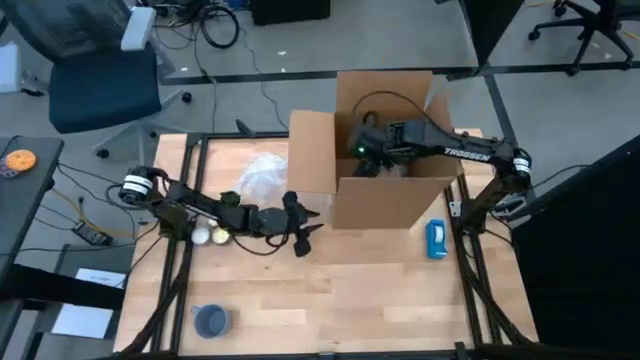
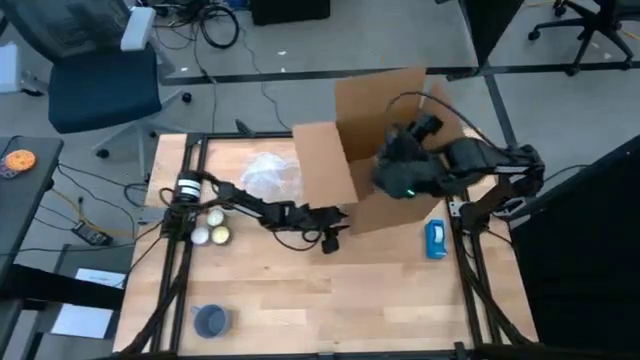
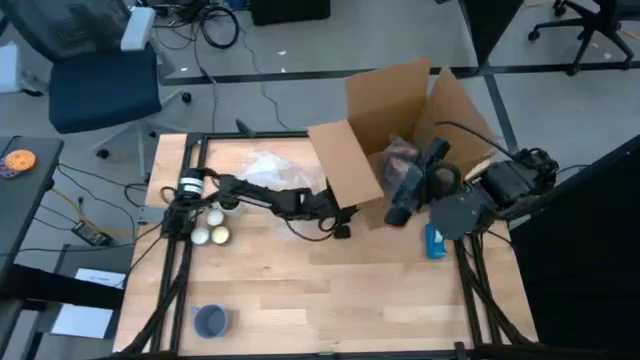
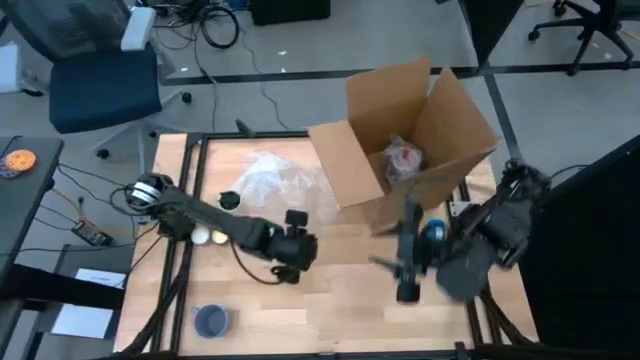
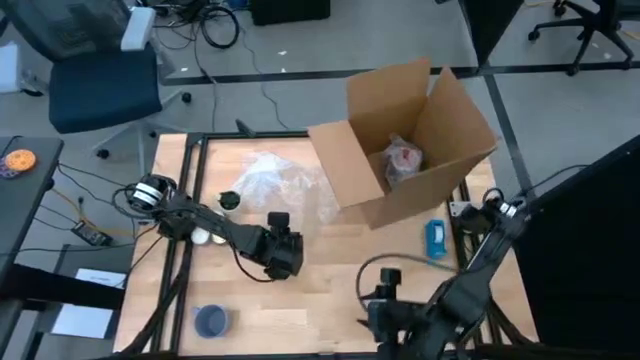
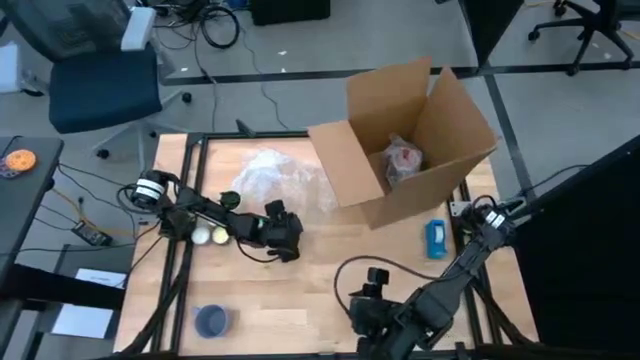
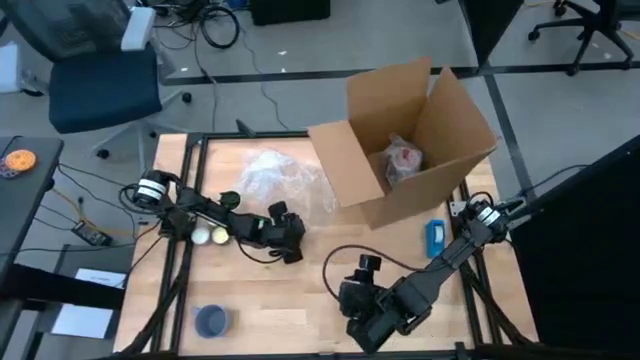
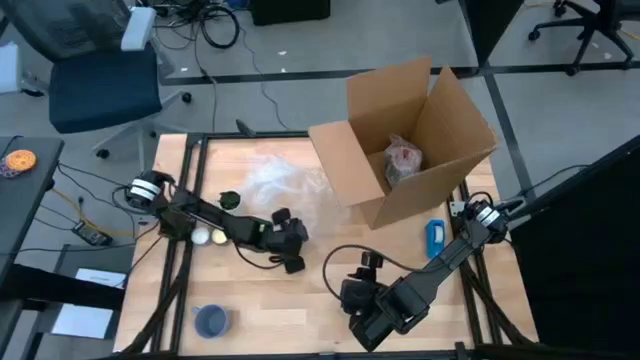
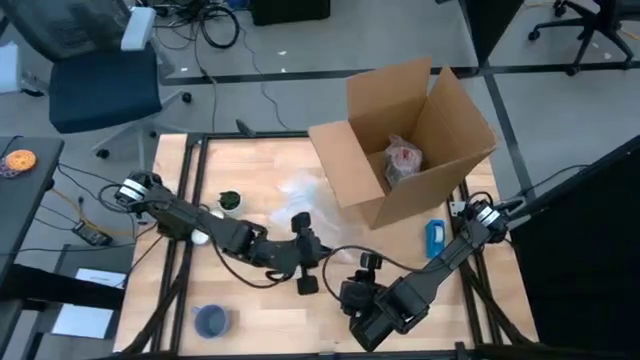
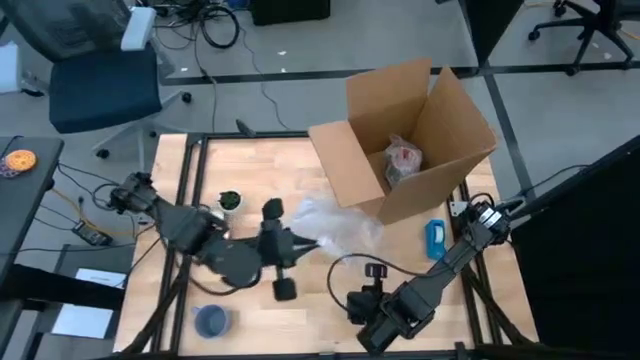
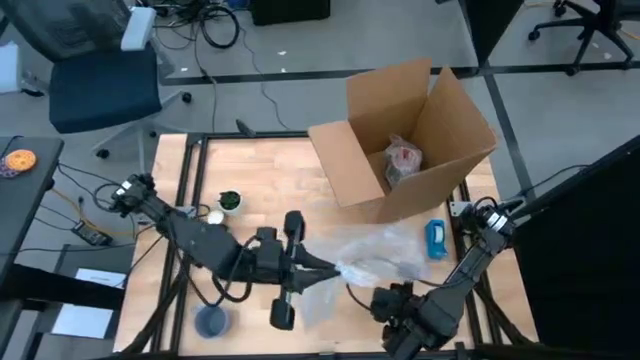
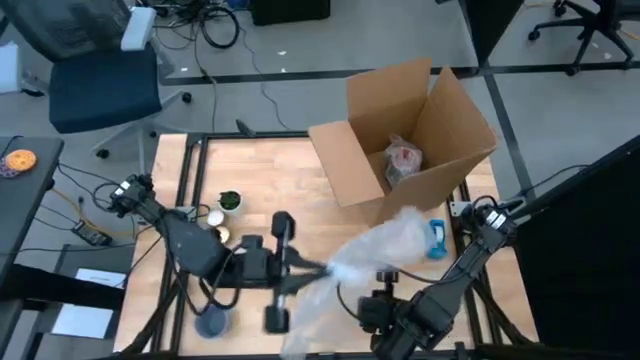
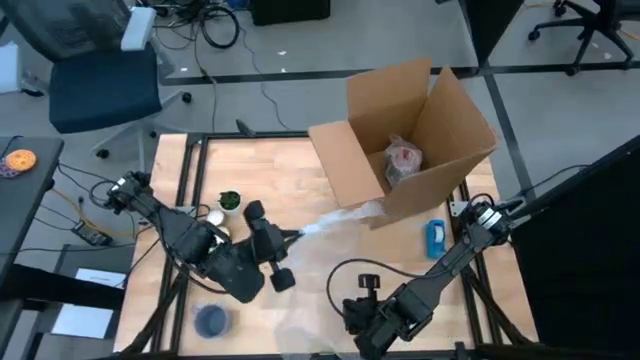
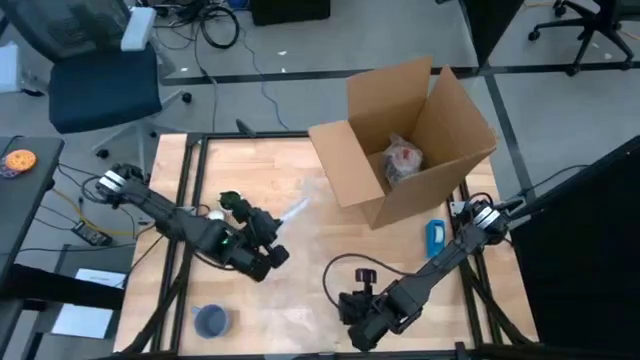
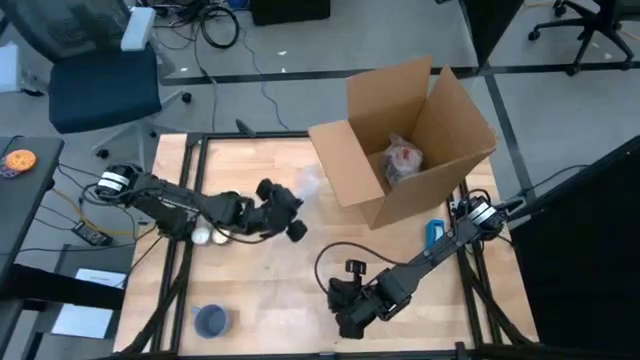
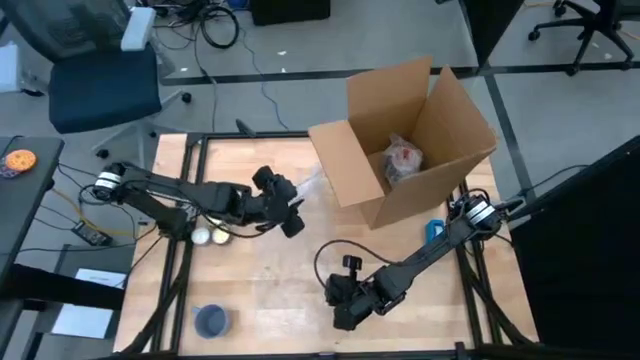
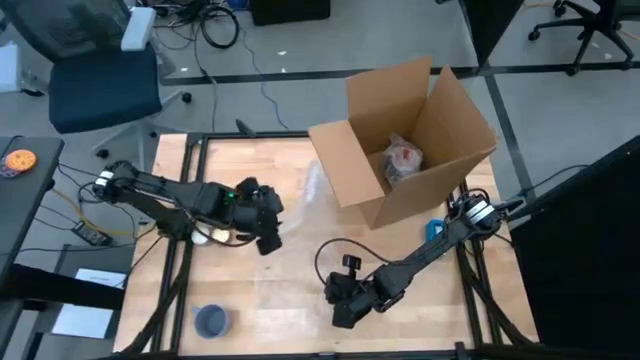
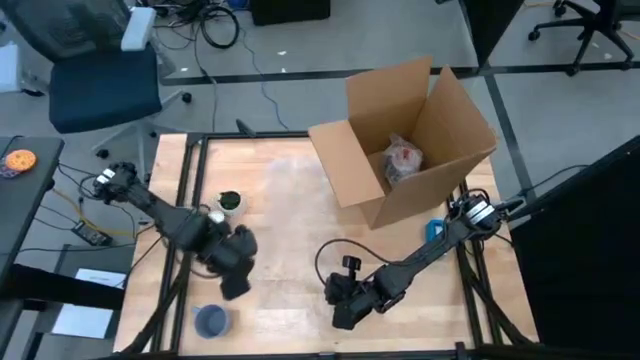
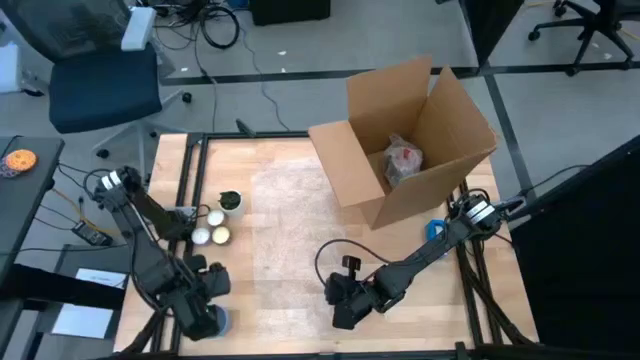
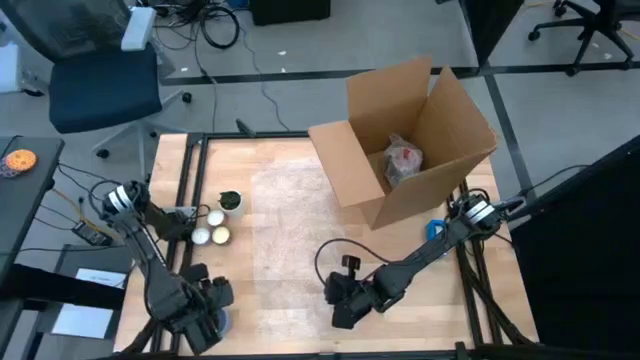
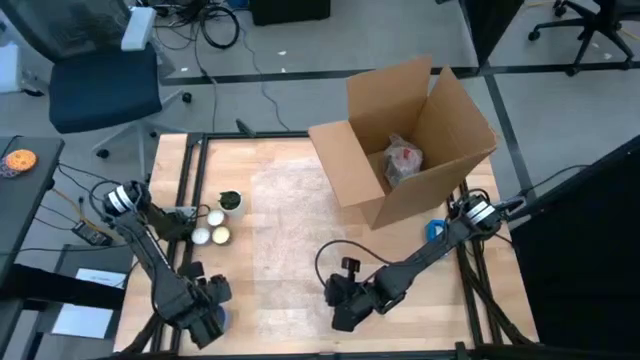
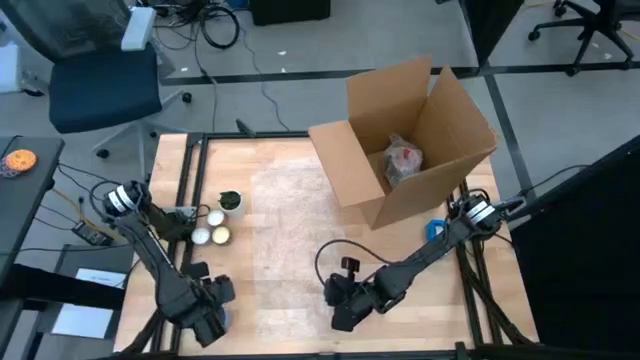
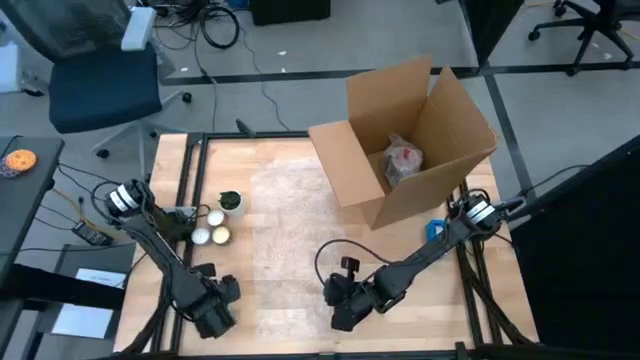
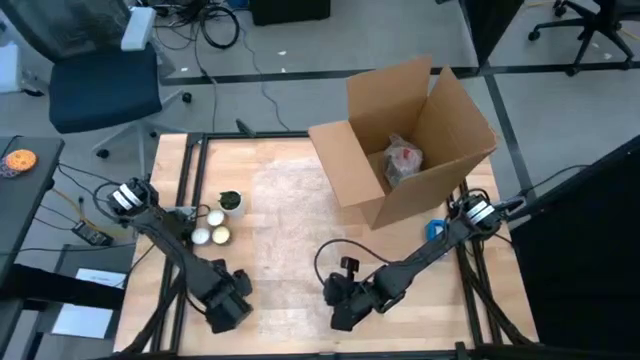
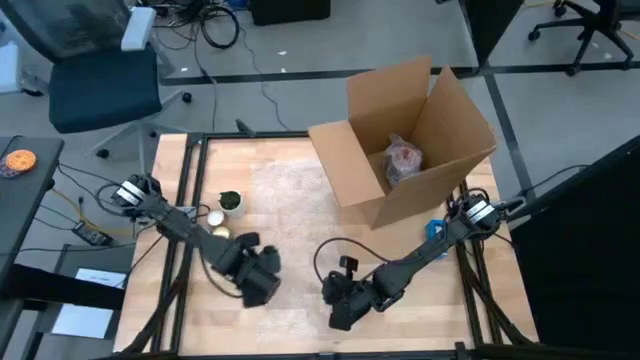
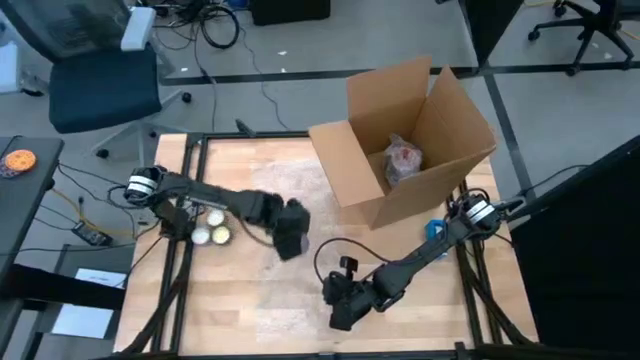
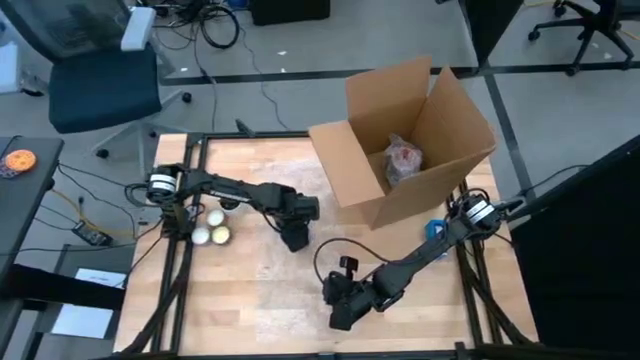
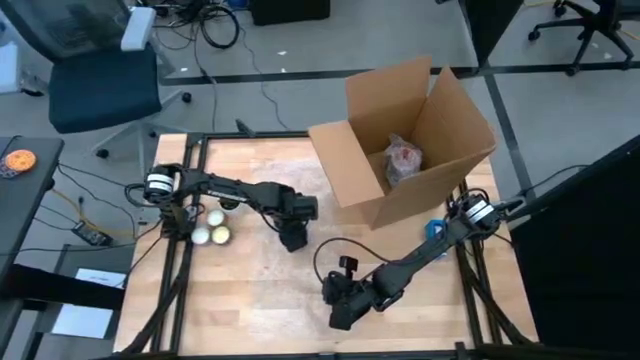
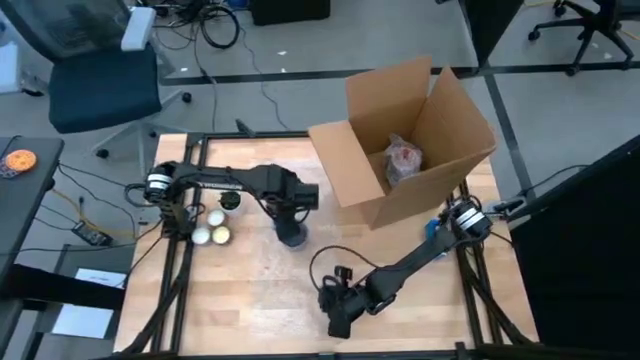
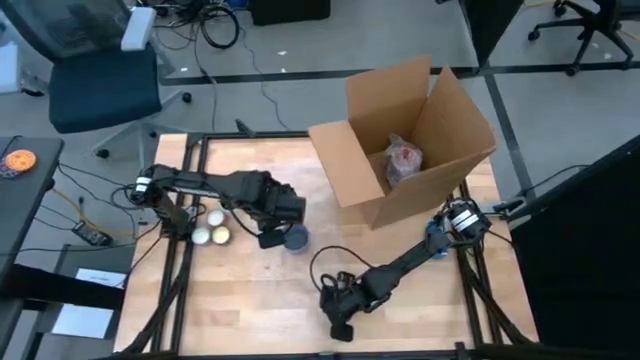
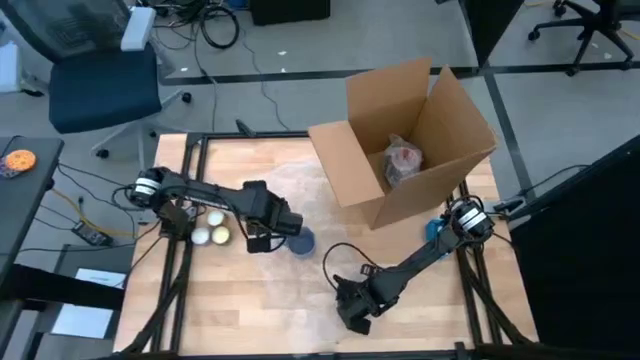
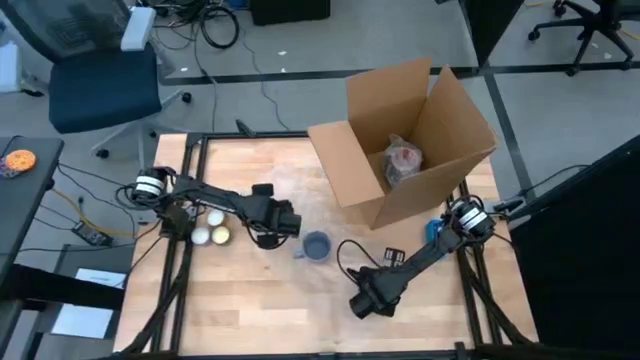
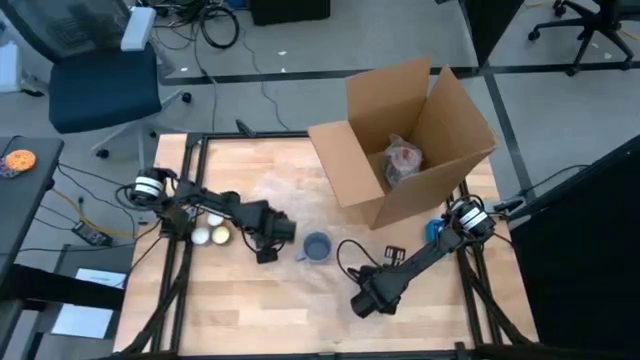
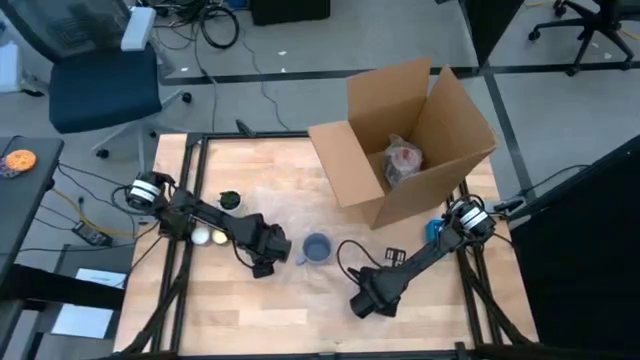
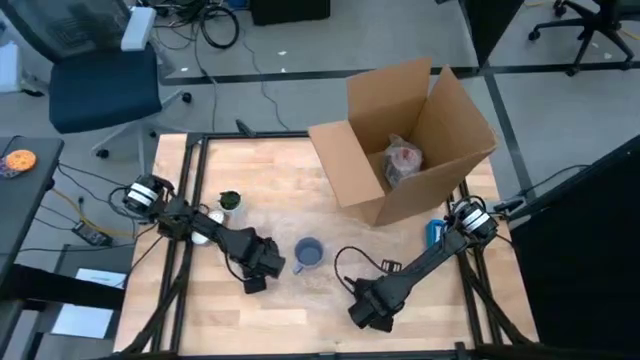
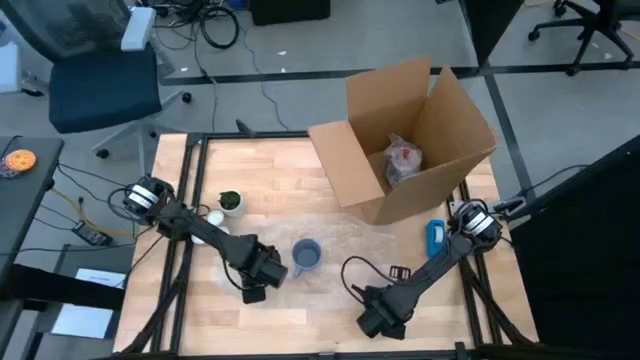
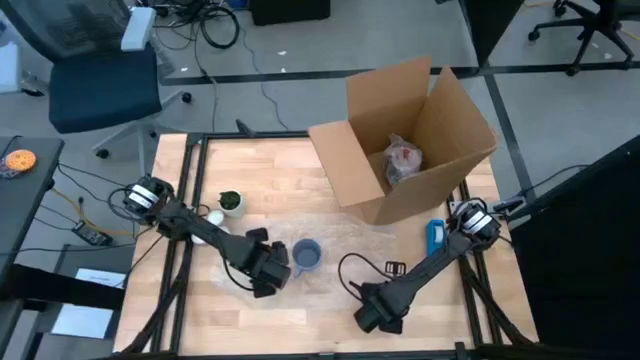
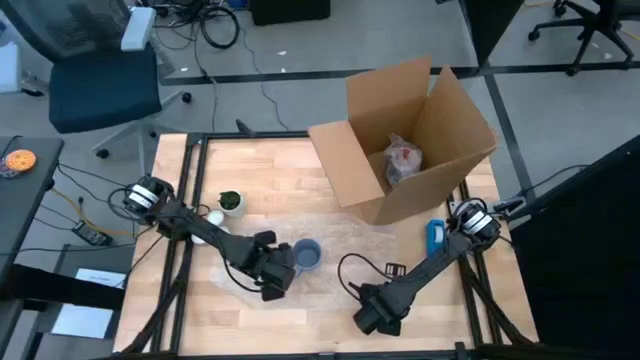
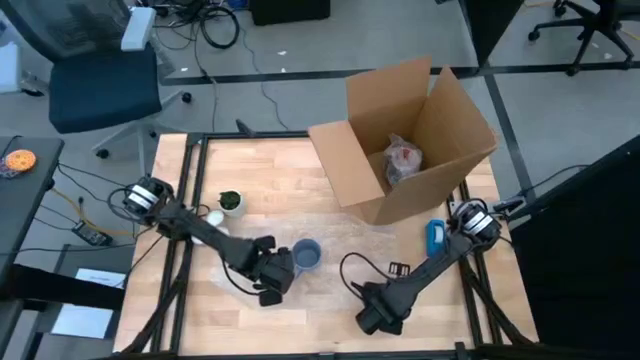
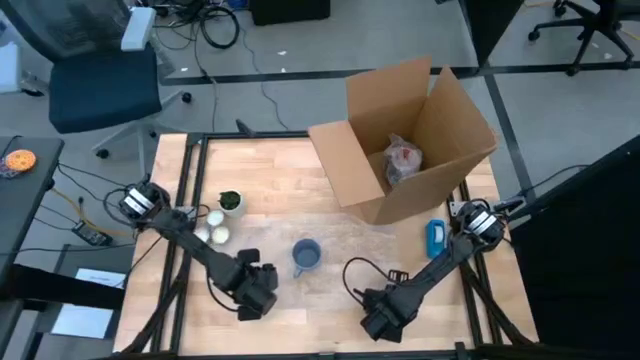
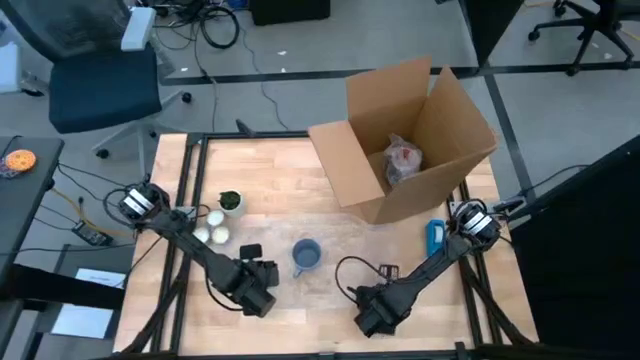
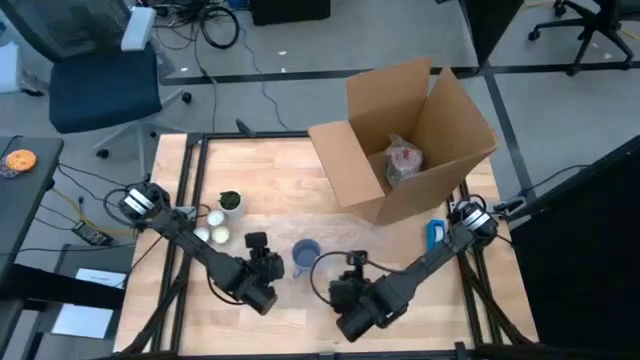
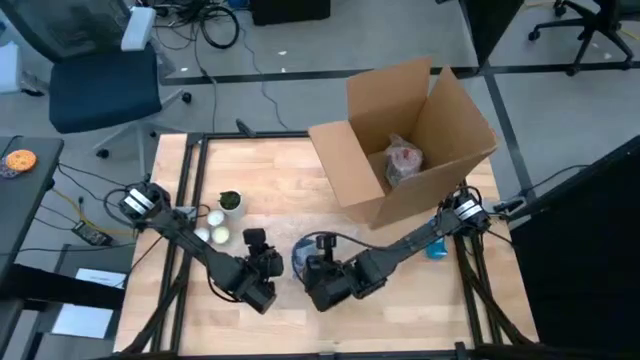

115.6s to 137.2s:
Task: wrap mug
Wrap the blue mug with bubble wrap
